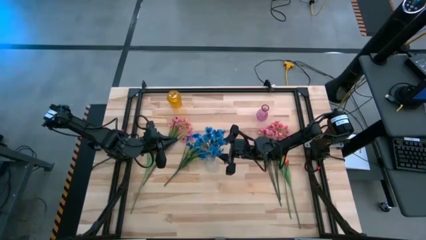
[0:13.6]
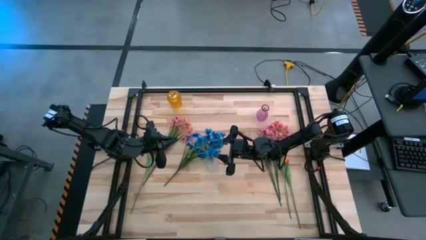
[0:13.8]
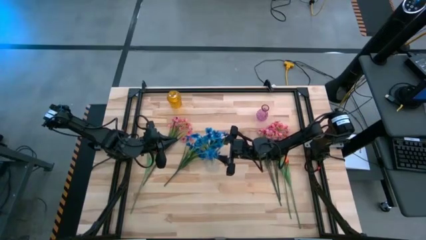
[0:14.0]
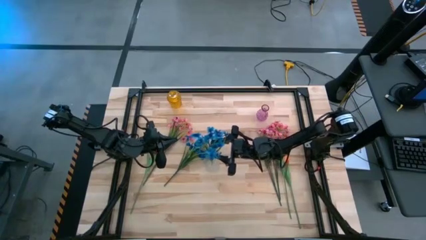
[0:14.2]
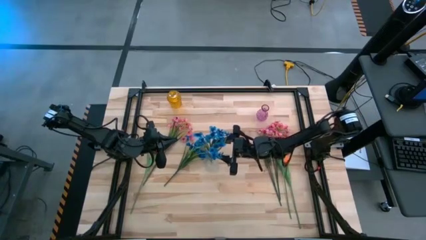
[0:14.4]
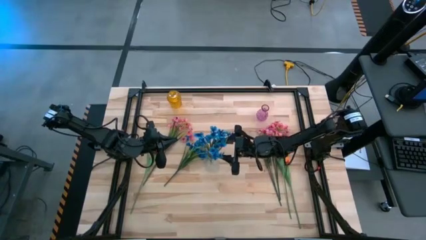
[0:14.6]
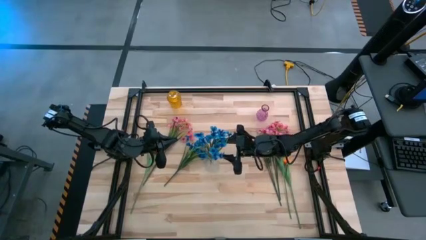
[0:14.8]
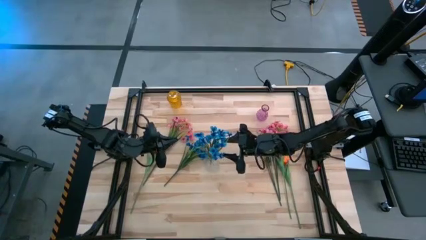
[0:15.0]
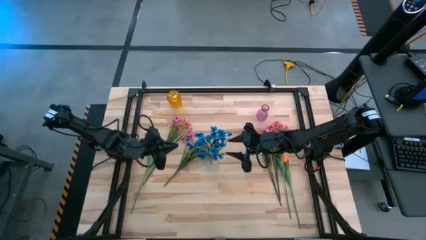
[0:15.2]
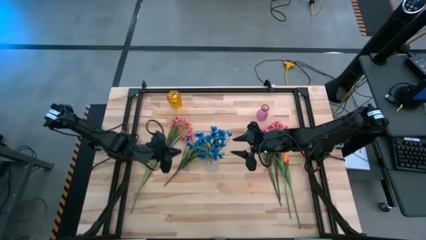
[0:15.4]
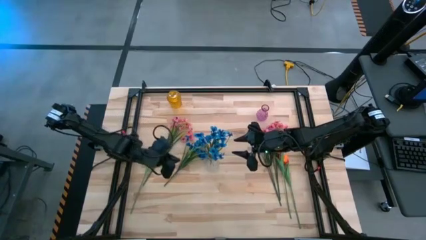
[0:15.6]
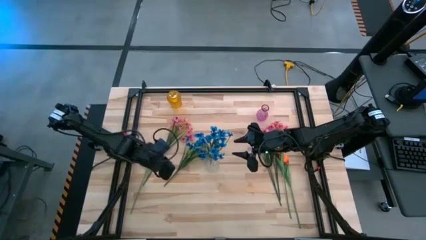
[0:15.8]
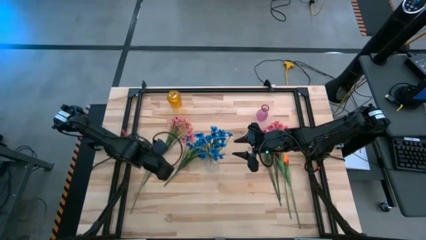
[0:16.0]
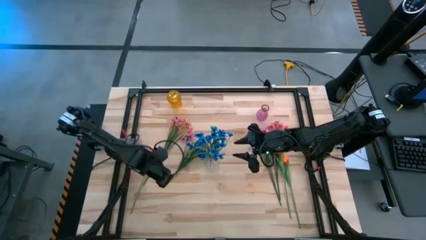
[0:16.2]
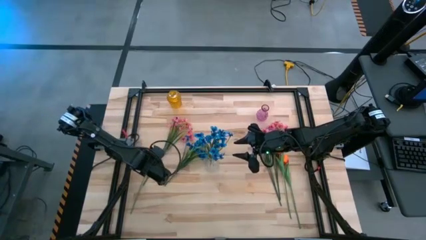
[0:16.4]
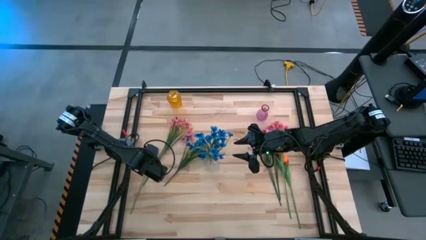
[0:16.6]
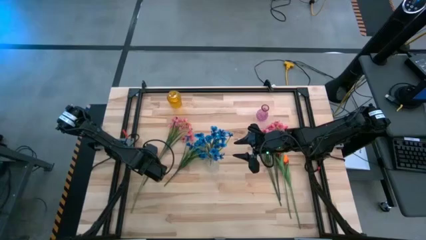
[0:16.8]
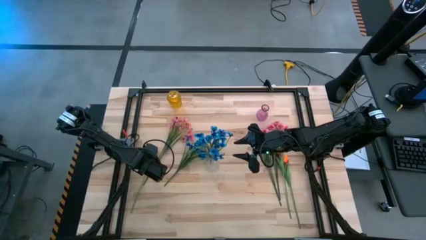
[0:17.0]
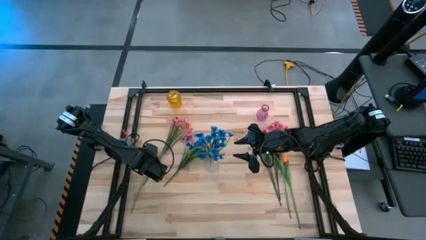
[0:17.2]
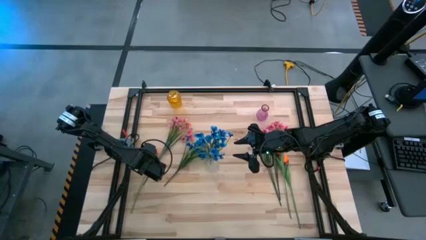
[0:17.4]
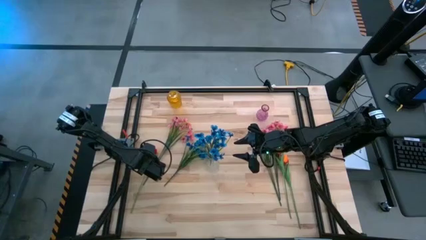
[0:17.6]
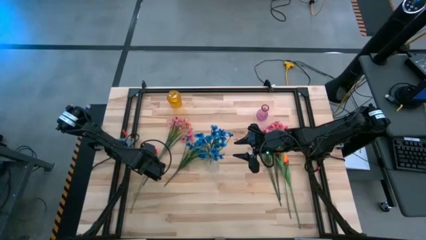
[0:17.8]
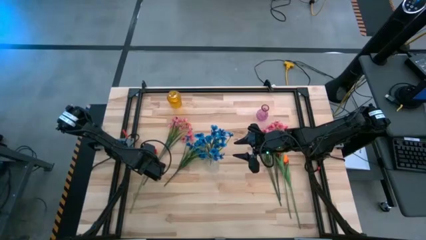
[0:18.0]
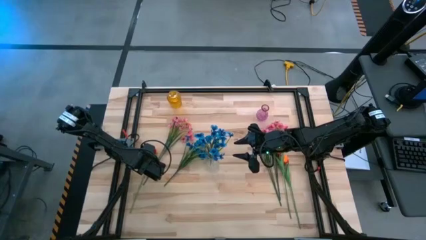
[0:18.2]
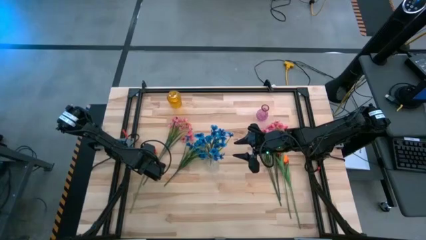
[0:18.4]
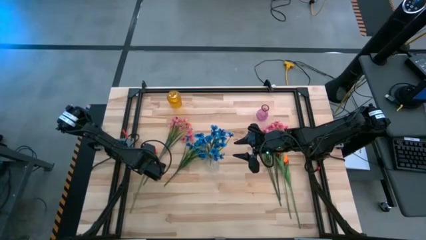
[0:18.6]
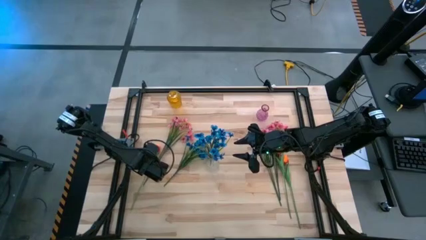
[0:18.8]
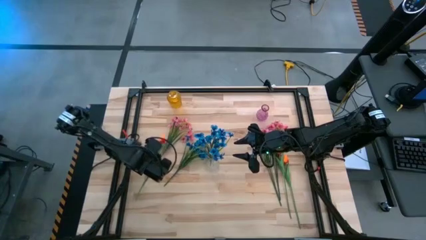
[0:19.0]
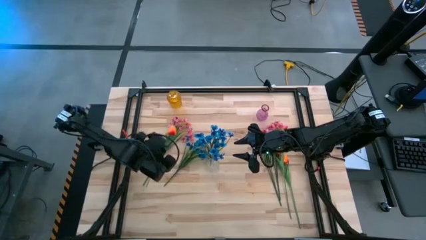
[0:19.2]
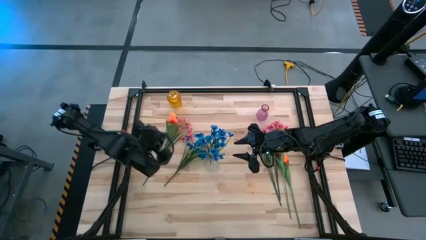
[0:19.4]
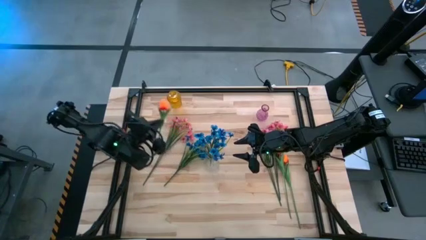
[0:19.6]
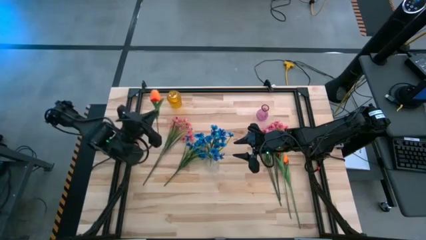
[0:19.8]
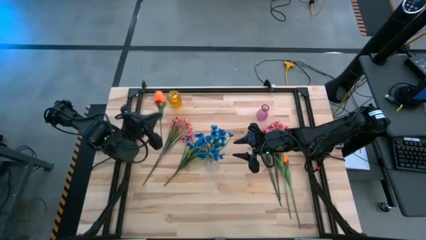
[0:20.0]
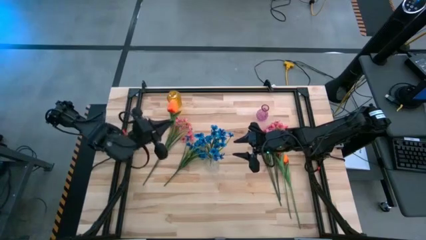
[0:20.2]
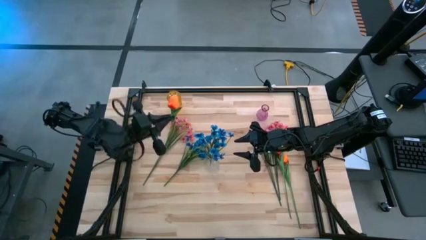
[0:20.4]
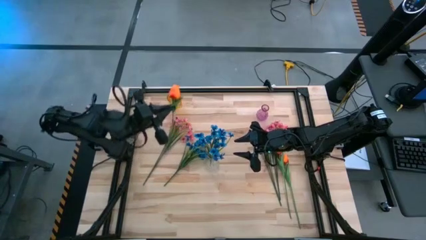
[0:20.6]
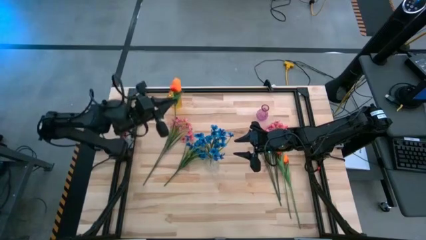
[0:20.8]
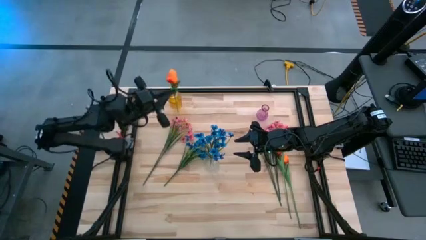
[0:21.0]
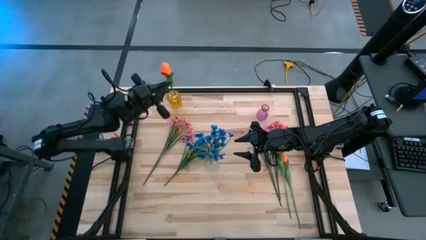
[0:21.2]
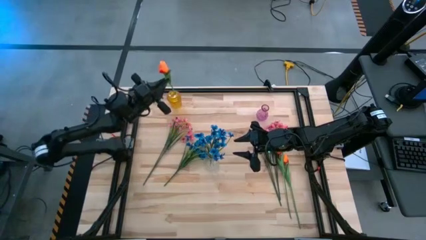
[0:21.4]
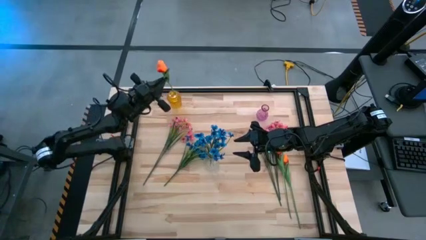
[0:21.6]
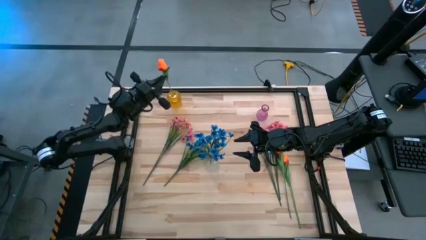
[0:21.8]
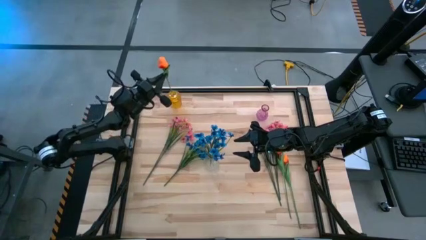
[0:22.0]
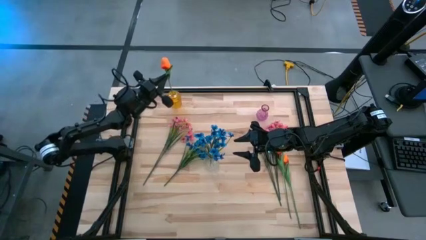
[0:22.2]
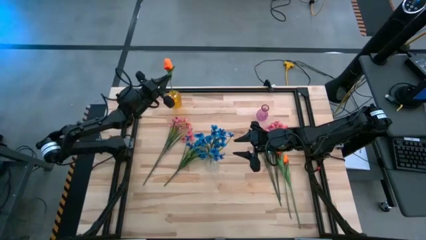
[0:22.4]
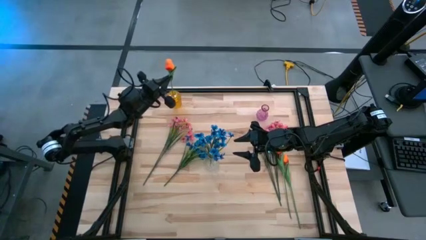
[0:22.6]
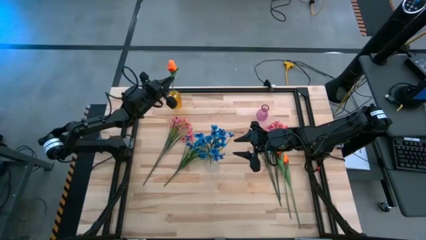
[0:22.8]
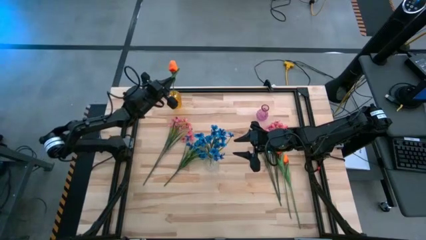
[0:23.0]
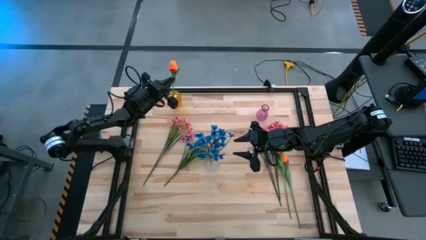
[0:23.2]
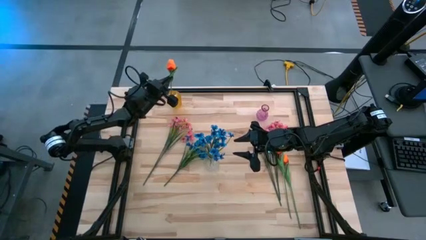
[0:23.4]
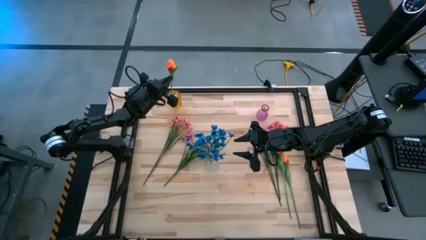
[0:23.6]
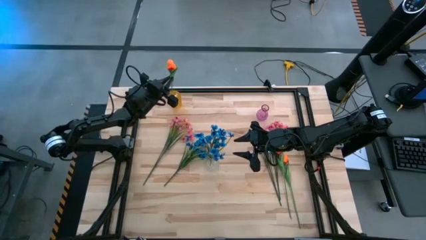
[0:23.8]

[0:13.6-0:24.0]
Task: Sort flowers into vase by color
Put the left orange tulip into the yellow vase

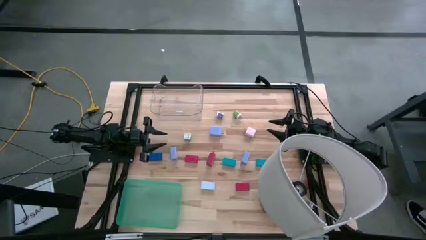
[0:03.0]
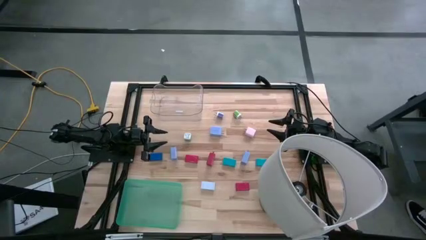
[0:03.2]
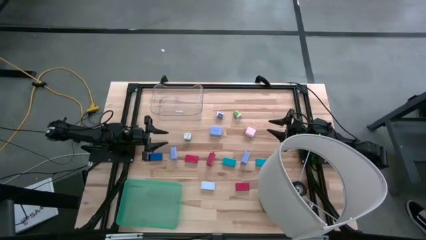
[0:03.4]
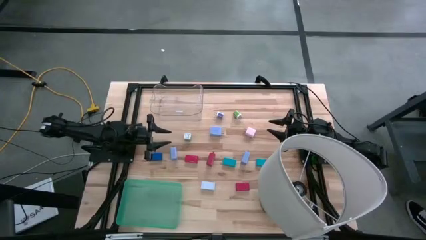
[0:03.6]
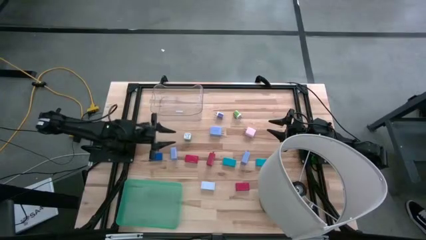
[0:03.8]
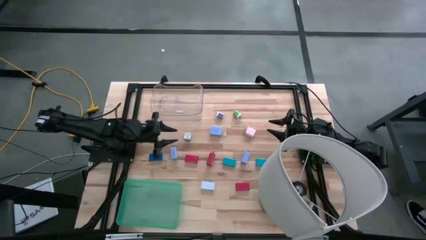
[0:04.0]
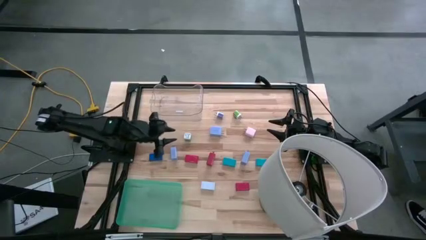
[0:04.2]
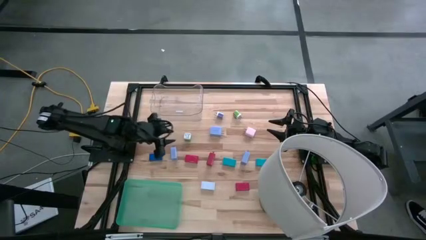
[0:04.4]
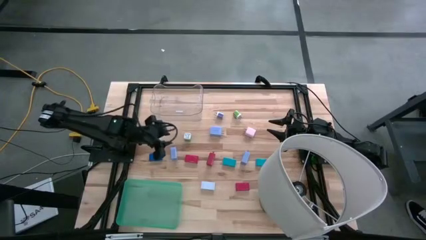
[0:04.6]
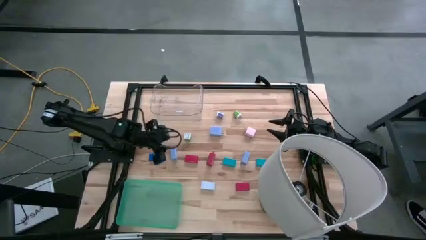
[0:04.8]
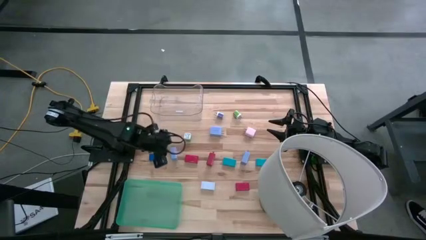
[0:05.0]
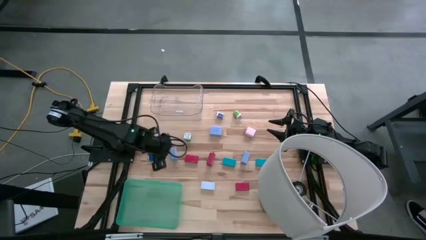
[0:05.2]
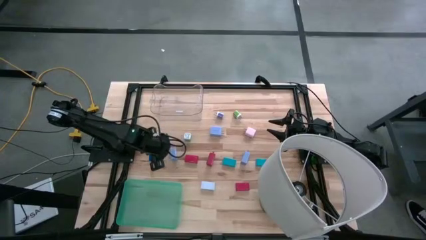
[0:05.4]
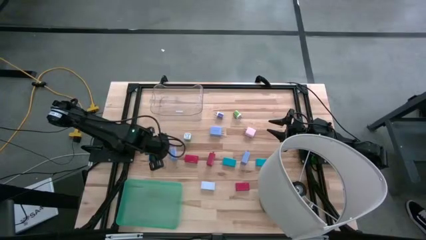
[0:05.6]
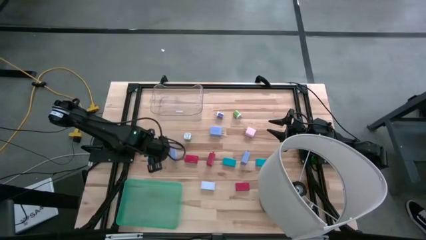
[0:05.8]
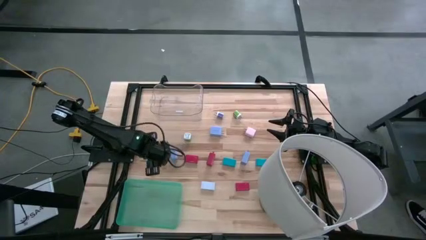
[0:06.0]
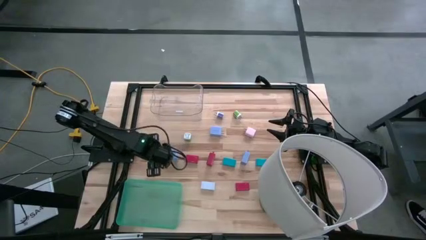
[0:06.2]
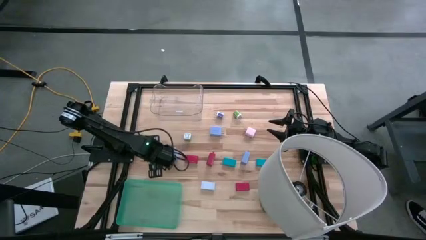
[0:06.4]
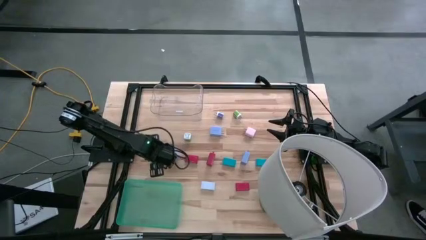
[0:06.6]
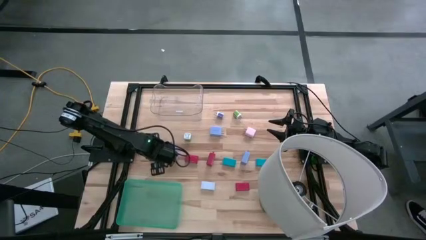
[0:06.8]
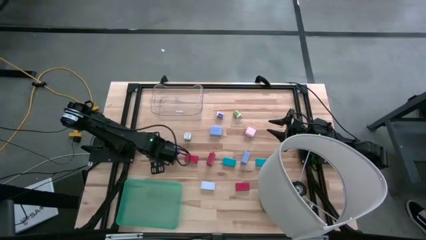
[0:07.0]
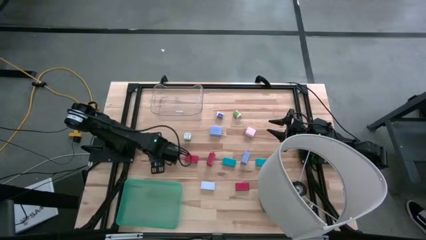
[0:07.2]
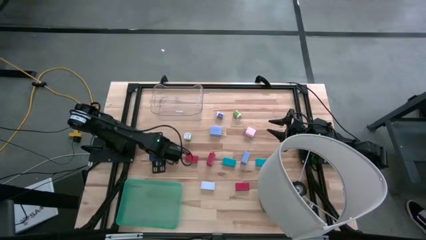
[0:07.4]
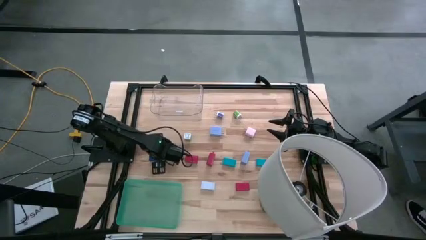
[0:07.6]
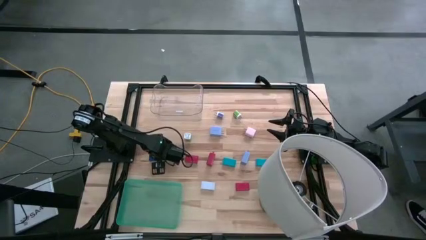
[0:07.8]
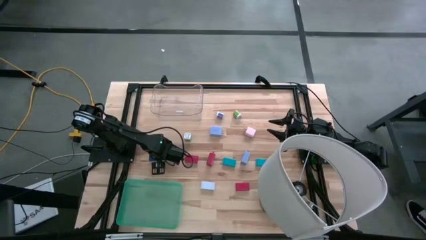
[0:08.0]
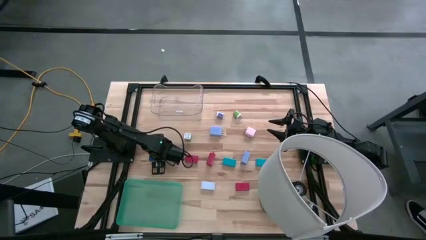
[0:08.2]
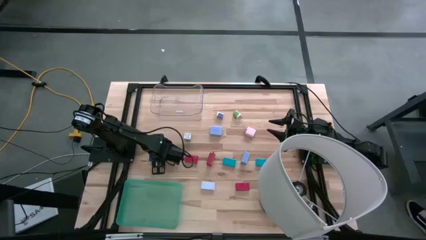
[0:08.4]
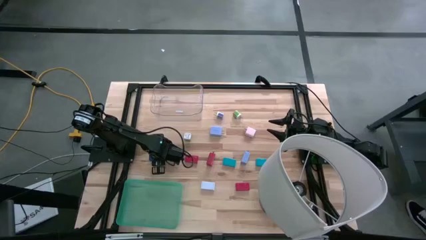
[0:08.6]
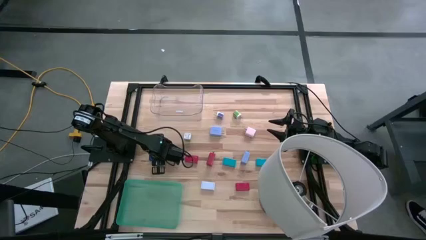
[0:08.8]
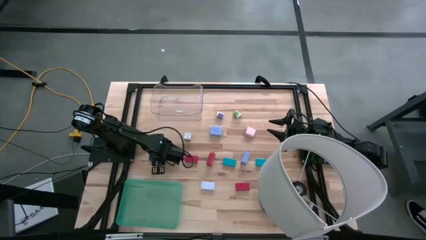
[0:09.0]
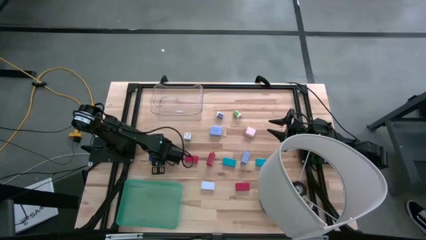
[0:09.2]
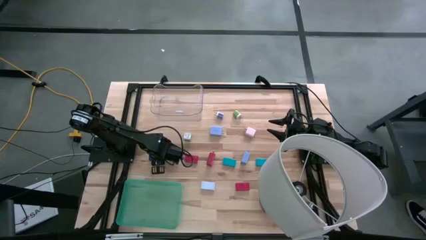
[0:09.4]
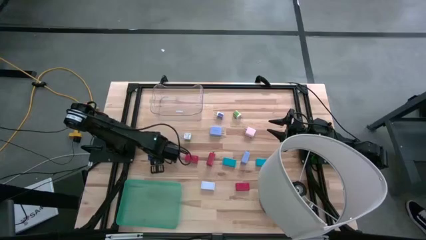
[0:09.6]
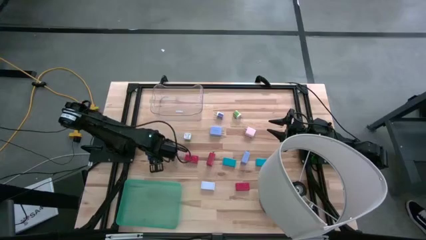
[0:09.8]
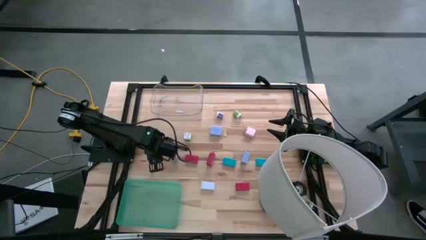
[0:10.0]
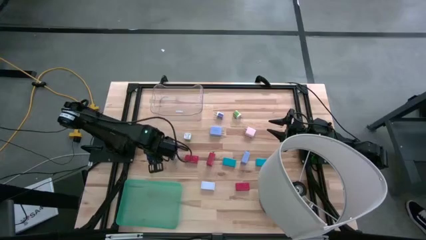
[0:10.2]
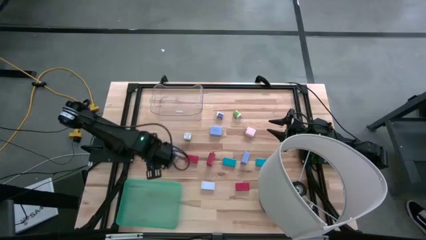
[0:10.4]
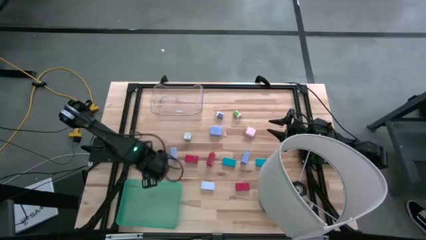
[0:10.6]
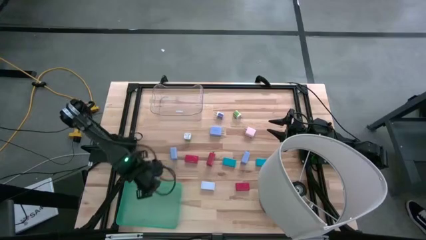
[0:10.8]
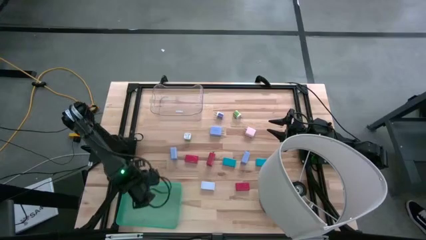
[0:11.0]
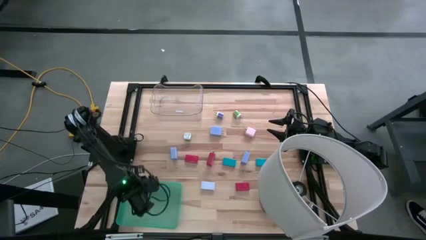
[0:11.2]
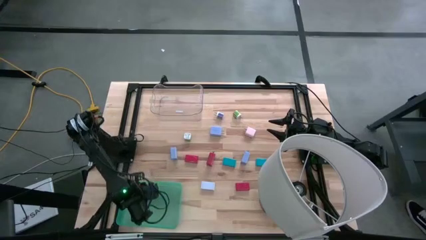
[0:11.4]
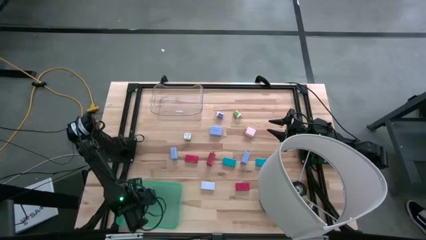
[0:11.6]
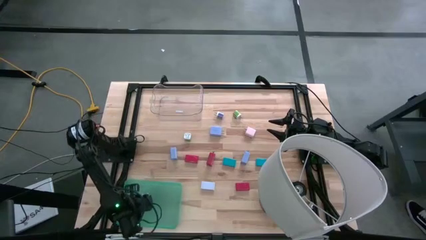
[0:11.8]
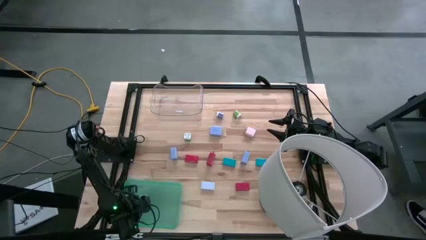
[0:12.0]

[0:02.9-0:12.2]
Task: Pick & Place Office items
Put the blue digital clock into the green bin
